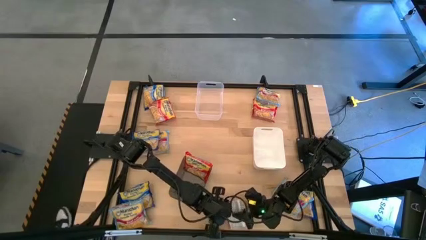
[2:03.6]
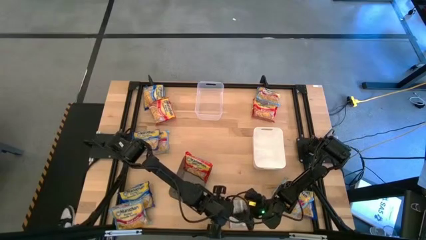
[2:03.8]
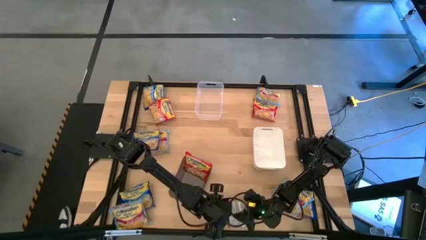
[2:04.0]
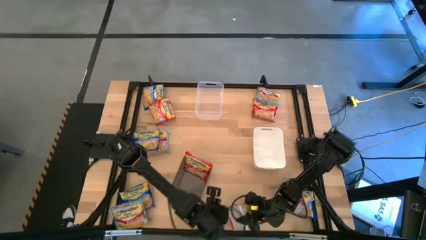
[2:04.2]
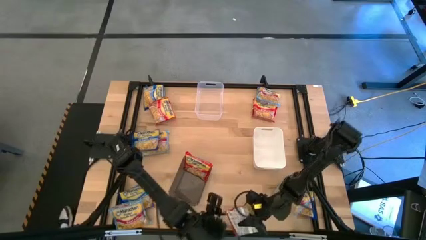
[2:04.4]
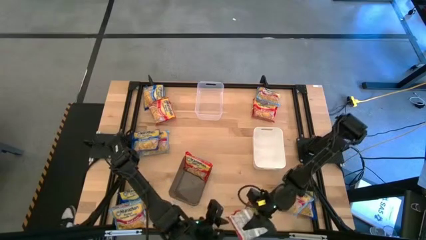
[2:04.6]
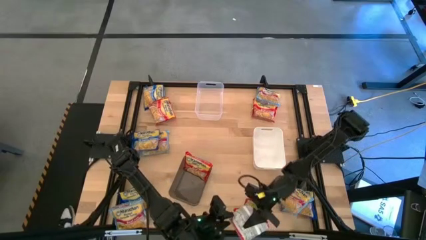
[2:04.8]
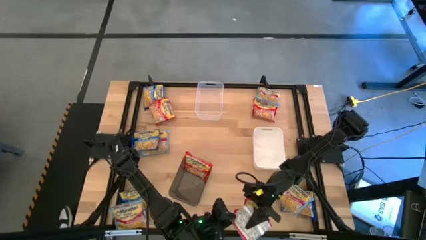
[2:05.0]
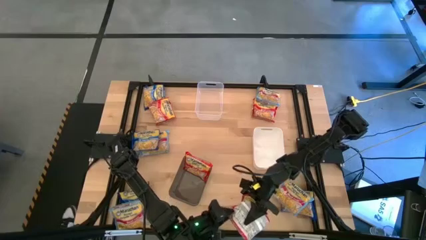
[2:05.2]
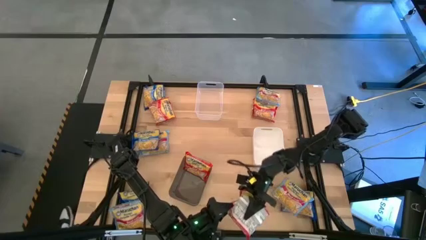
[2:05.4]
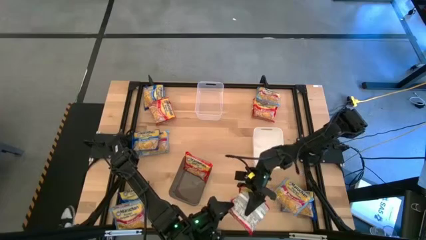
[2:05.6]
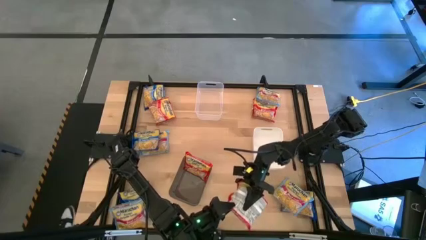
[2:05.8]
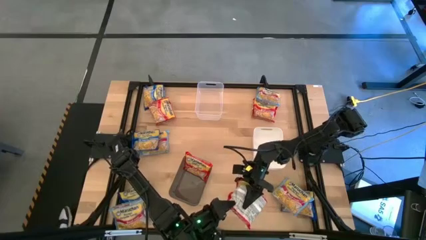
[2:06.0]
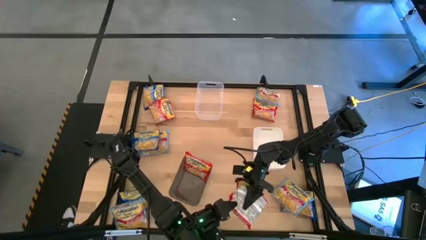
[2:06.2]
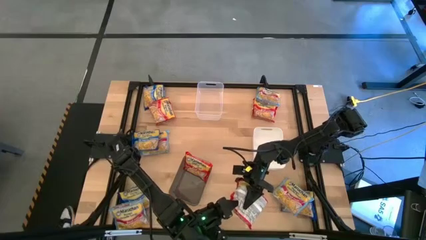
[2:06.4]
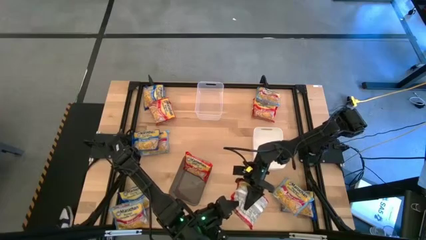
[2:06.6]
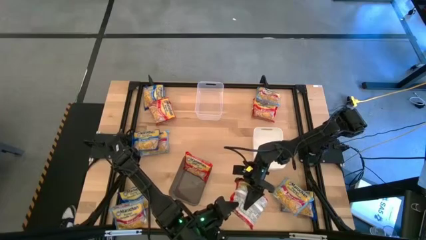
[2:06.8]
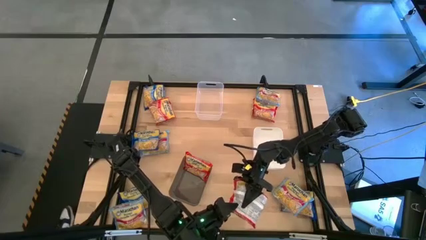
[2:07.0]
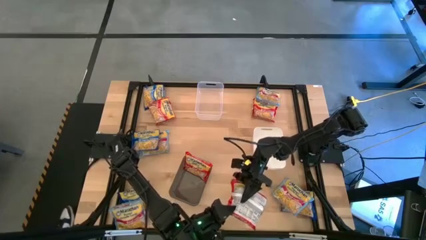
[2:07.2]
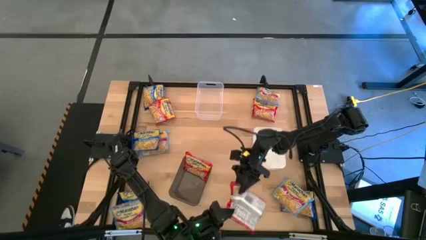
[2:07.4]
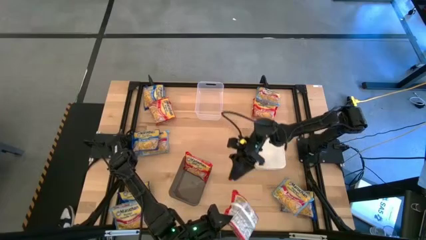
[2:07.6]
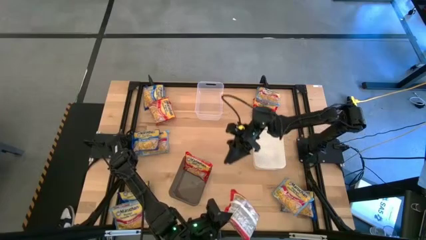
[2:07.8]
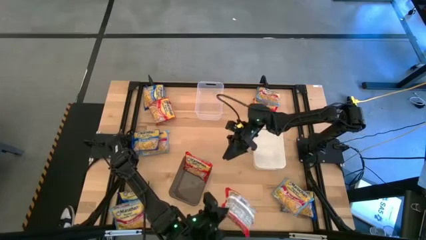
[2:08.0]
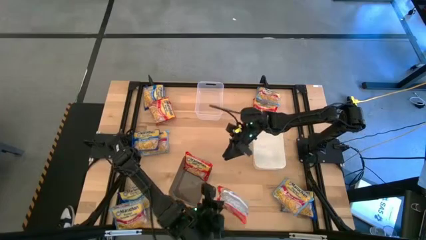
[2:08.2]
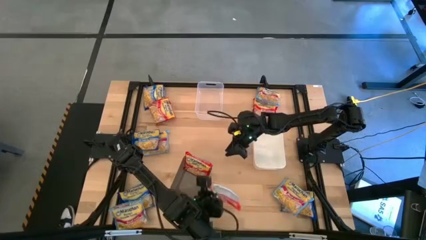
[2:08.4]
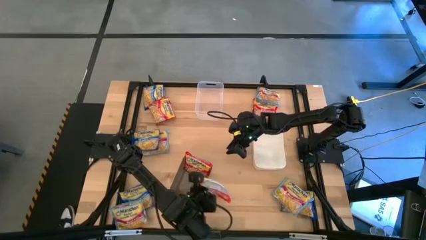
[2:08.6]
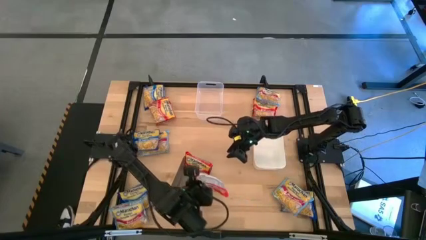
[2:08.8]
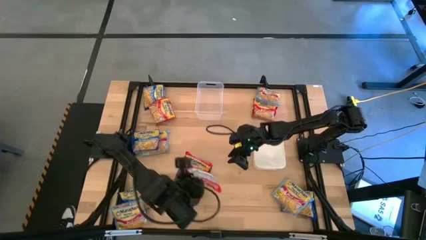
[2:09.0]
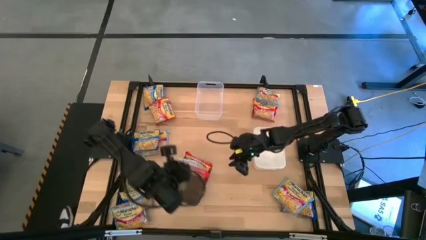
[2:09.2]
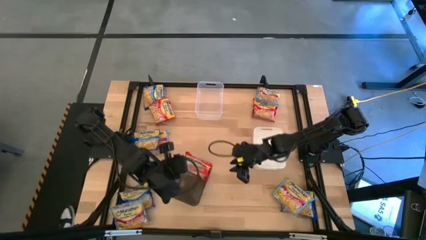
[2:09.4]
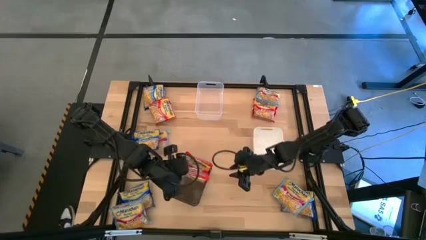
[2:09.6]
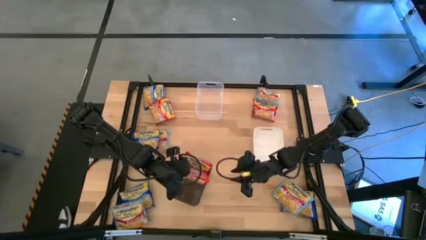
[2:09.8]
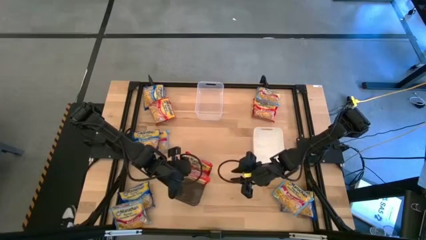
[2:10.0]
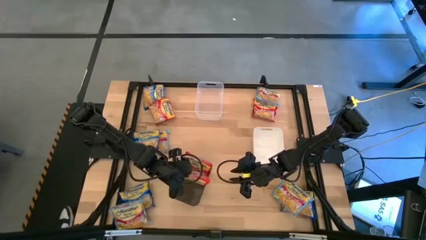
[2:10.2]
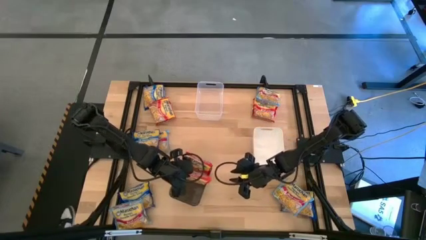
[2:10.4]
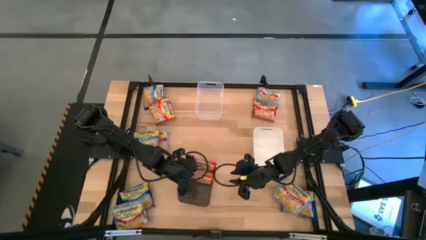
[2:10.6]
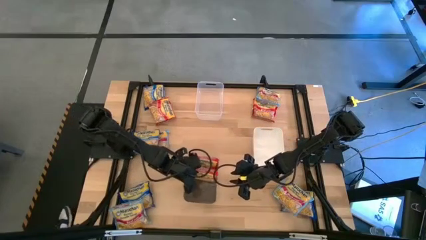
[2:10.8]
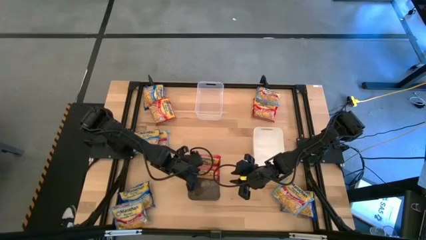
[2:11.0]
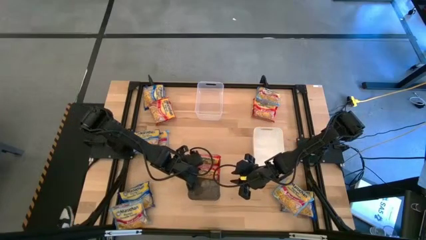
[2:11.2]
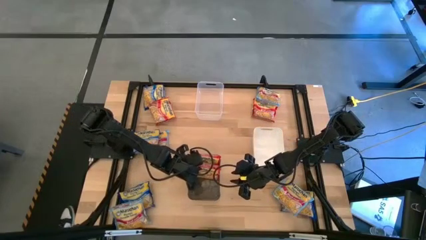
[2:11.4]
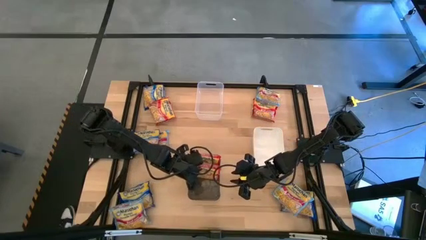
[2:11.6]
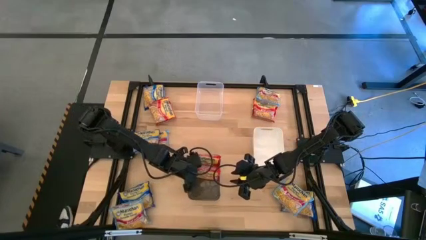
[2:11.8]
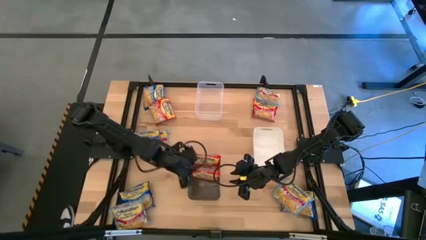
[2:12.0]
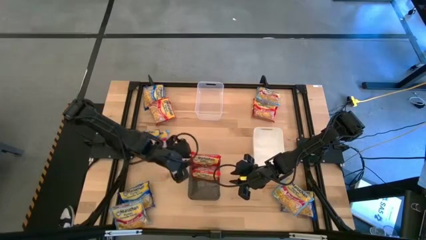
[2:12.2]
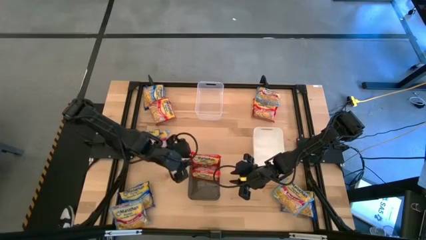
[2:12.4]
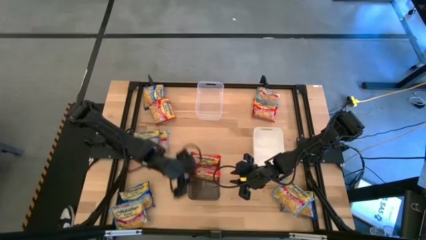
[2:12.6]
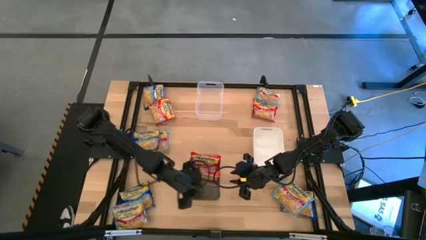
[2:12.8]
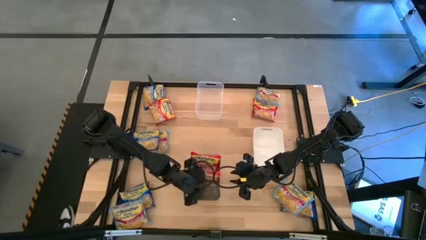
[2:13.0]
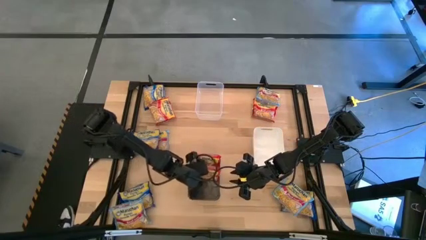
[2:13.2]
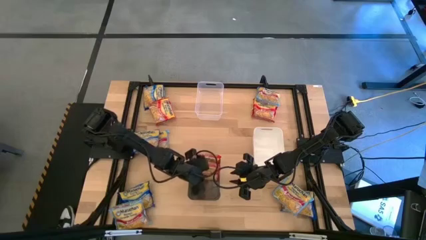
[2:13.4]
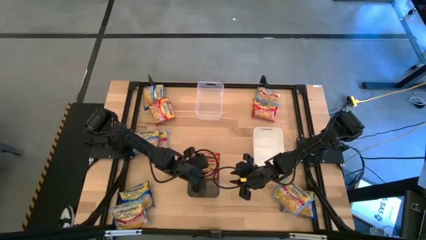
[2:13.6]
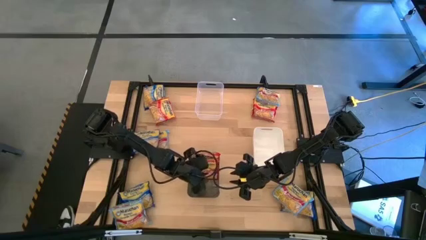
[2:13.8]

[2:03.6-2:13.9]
Task: Sort Maruchan noodles
Put the red noodle pack into the gray bin

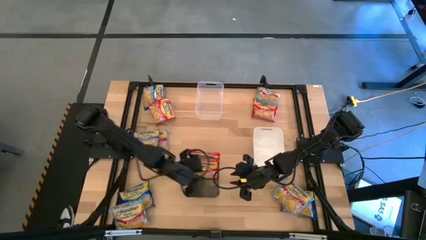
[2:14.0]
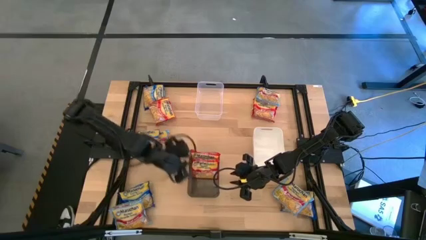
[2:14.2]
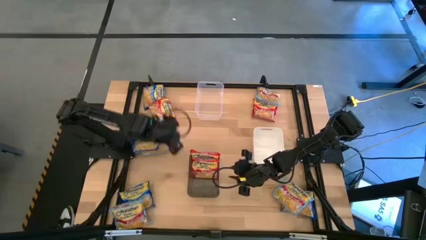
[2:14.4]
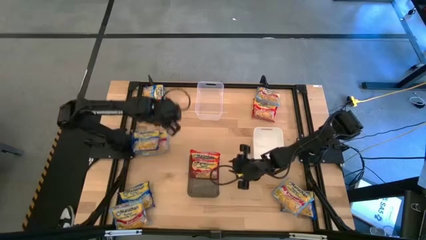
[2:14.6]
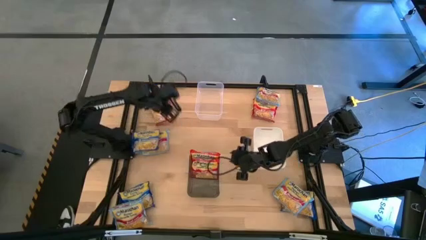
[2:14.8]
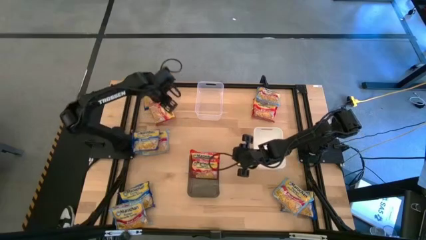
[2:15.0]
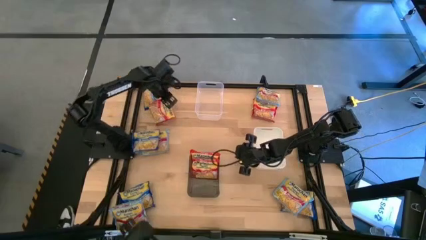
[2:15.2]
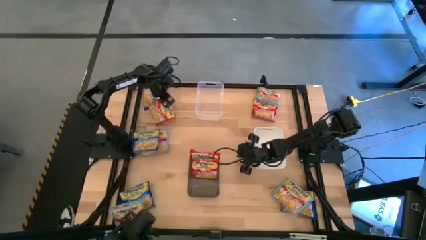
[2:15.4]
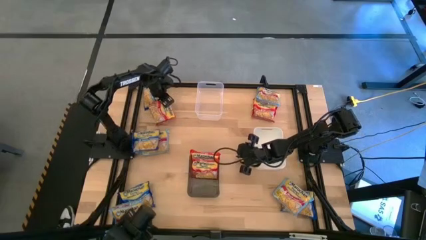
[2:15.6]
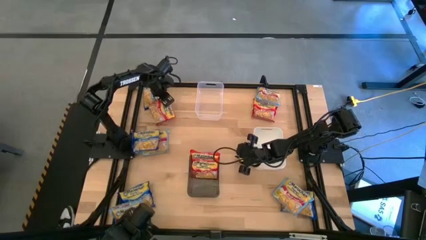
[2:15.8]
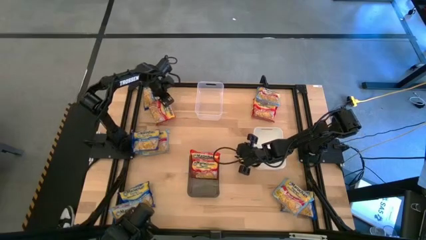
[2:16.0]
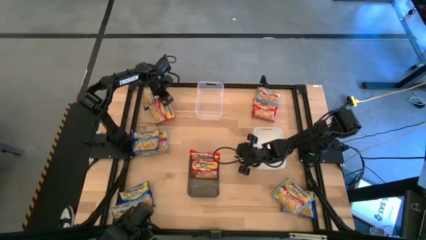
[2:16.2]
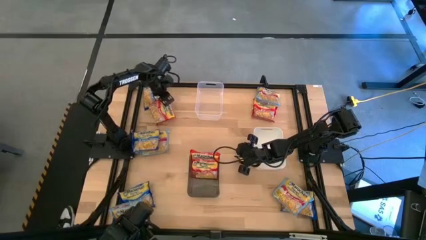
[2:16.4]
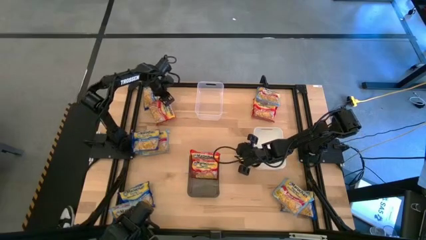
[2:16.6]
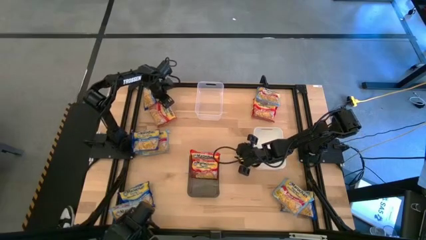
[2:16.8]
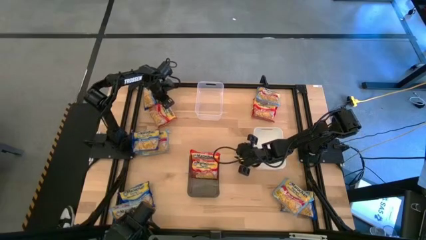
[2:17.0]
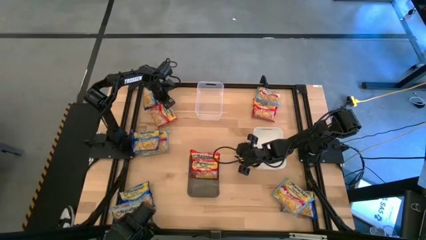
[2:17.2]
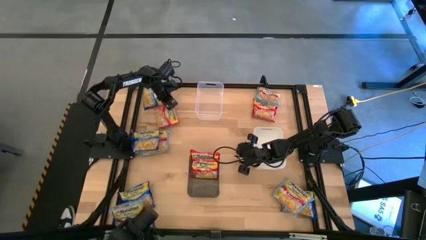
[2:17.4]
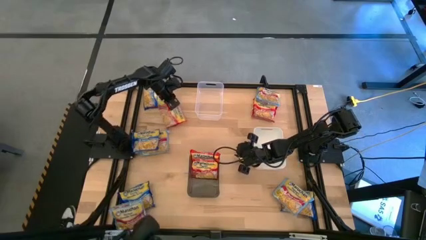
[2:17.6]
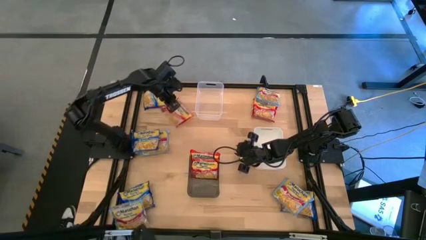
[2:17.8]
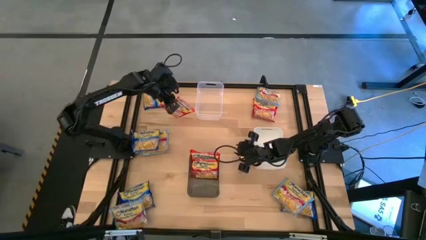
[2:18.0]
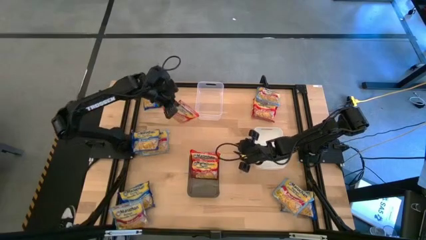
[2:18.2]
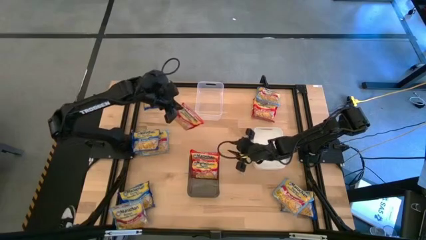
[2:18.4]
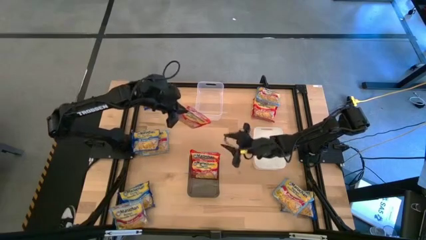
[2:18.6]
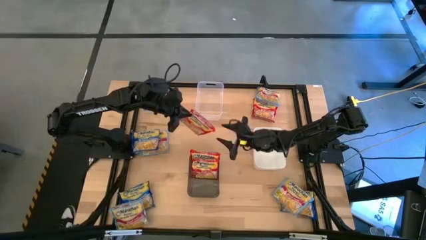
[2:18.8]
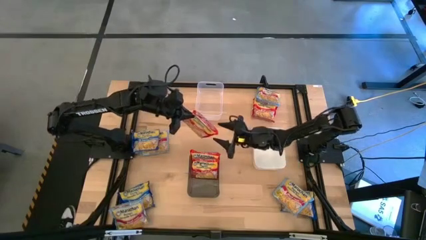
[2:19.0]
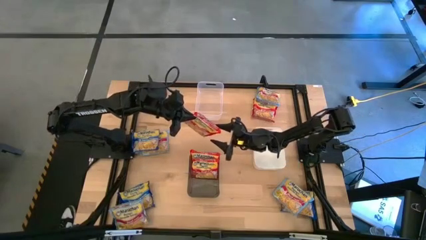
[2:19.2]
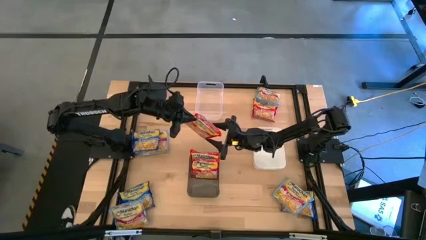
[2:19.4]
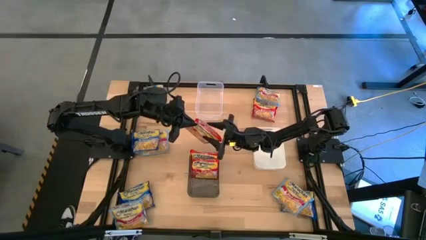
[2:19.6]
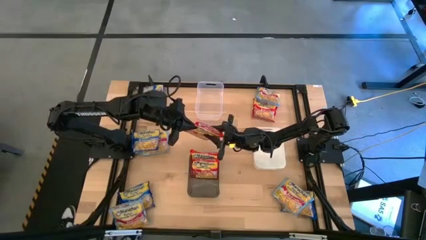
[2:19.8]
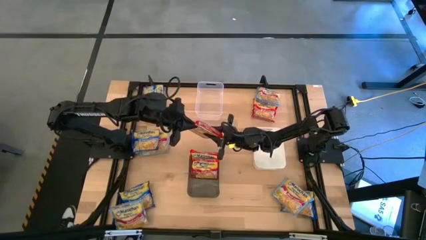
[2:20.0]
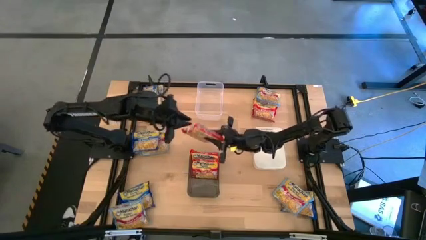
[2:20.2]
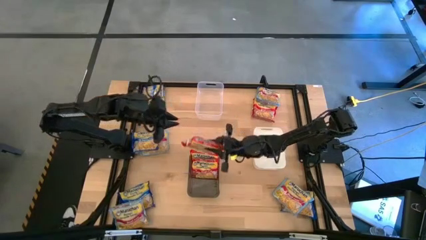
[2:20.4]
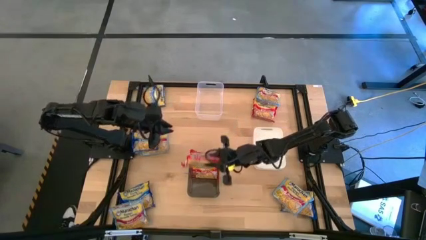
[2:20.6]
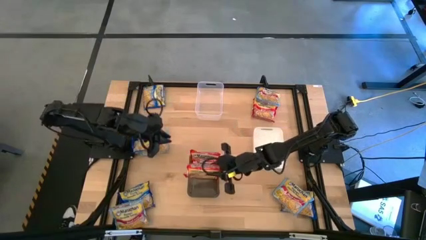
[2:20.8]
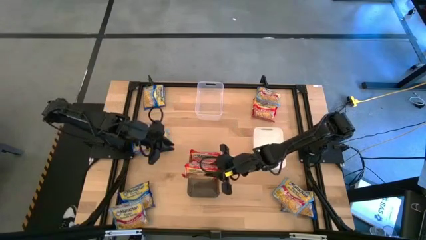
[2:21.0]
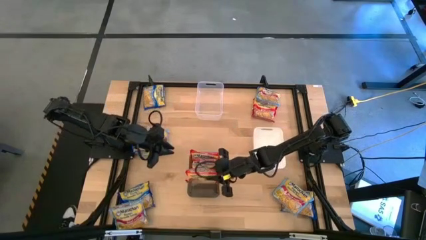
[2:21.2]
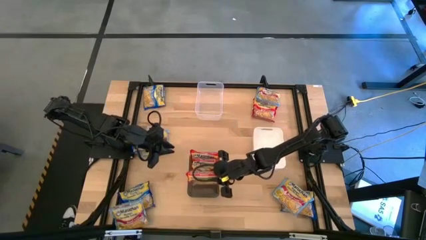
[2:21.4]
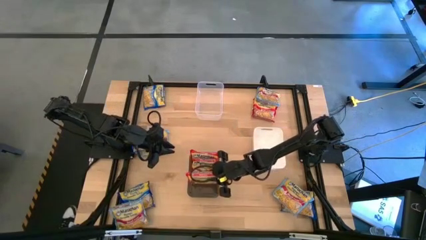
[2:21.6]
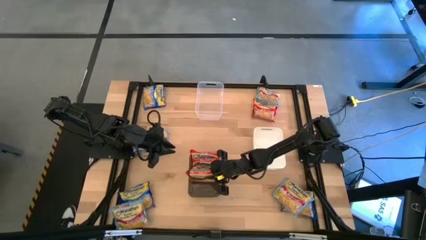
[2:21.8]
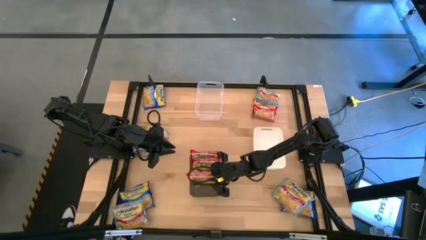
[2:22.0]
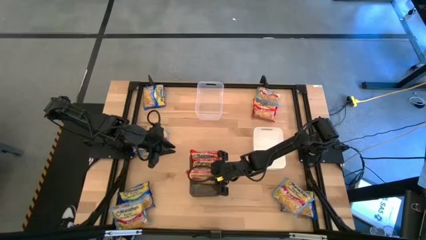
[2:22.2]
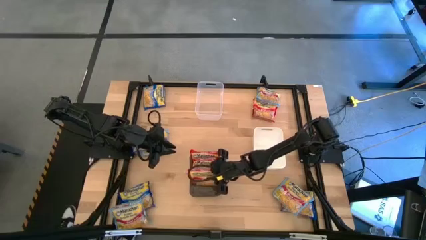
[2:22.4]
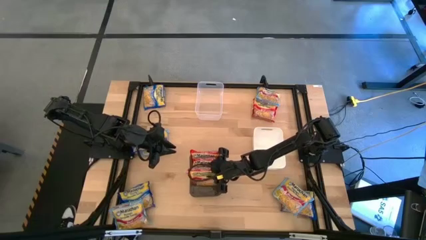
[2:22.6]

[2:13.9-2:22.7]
Put the red noodle pack into the gray bin
